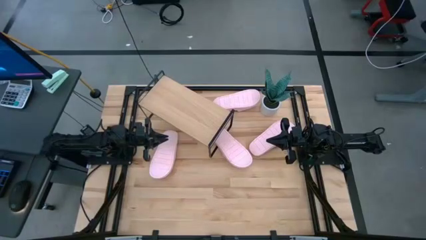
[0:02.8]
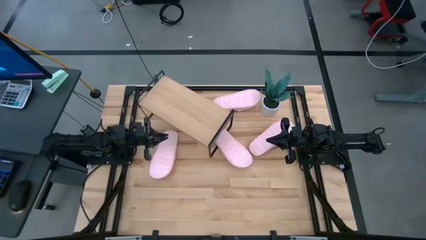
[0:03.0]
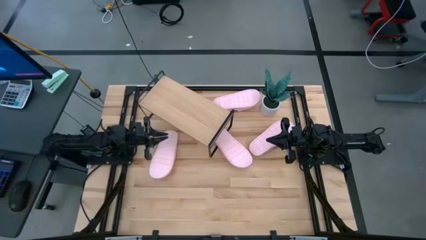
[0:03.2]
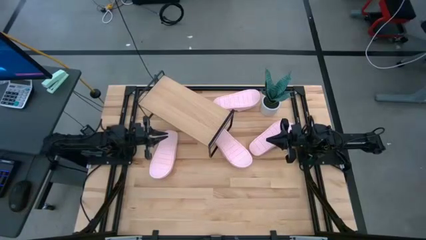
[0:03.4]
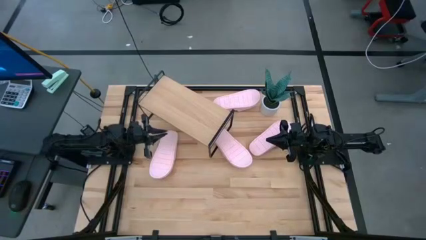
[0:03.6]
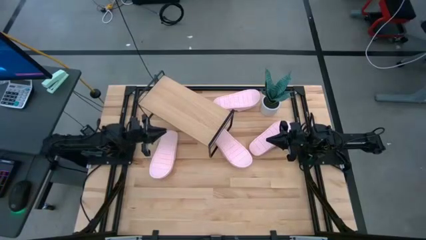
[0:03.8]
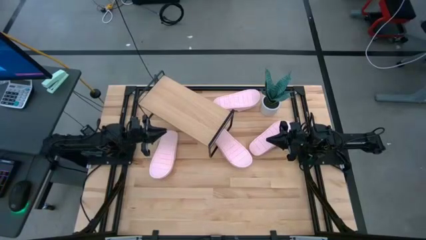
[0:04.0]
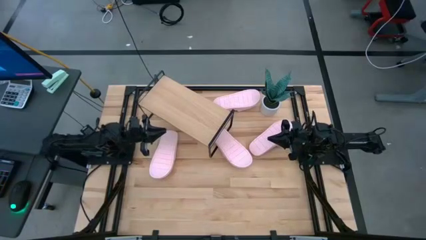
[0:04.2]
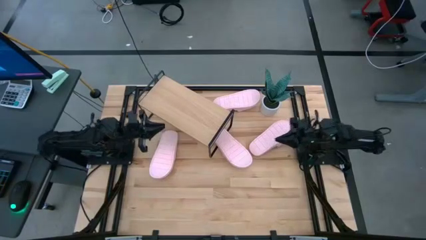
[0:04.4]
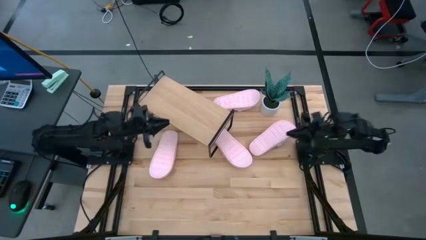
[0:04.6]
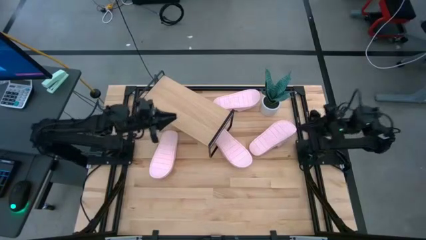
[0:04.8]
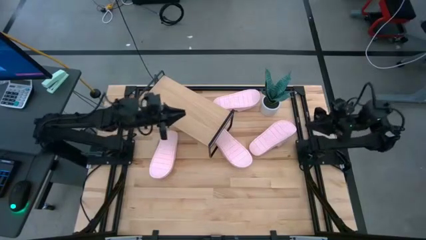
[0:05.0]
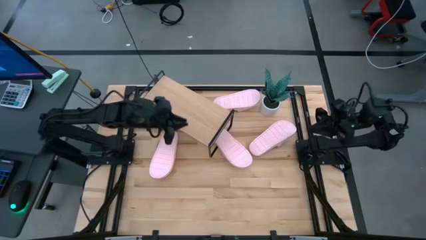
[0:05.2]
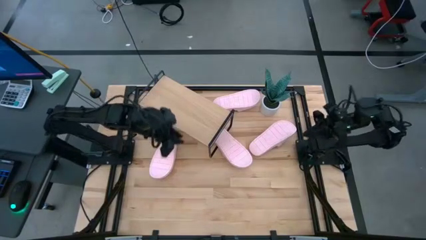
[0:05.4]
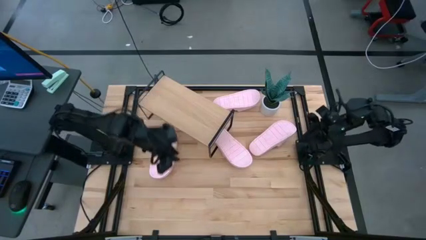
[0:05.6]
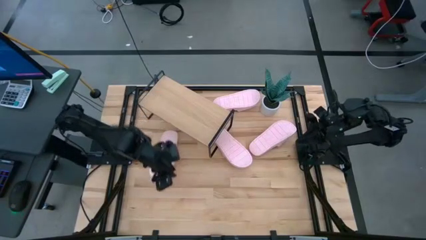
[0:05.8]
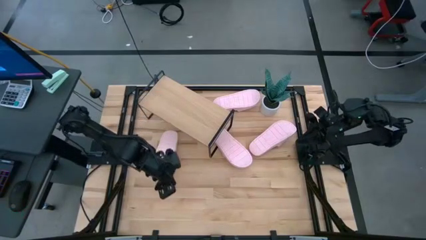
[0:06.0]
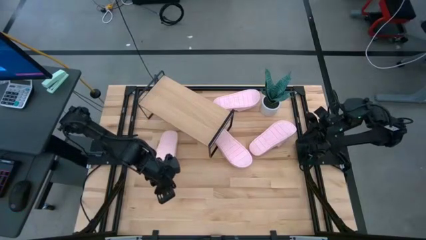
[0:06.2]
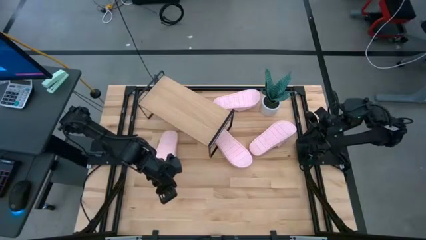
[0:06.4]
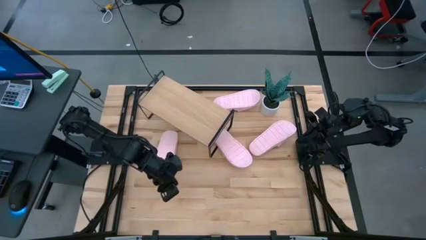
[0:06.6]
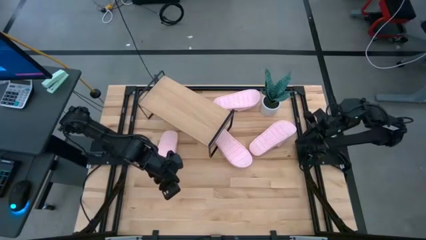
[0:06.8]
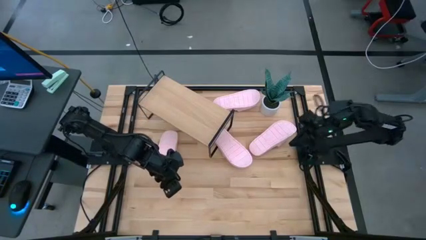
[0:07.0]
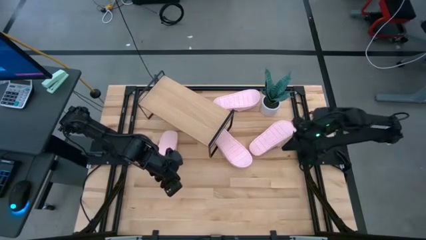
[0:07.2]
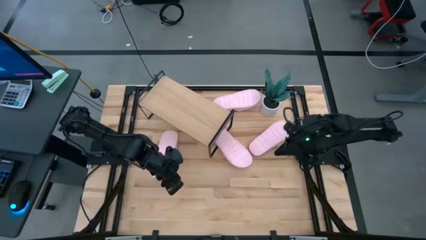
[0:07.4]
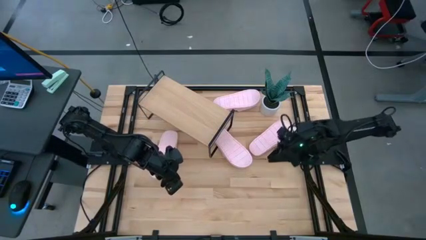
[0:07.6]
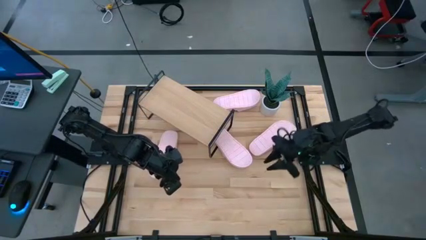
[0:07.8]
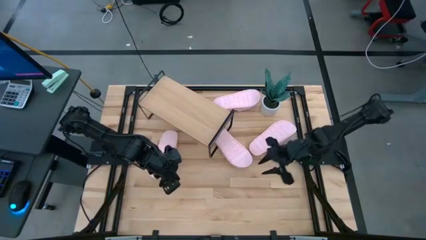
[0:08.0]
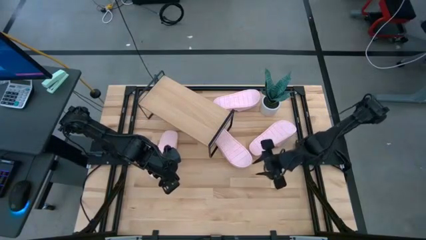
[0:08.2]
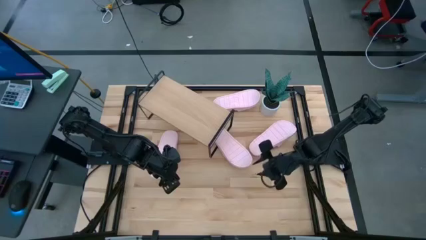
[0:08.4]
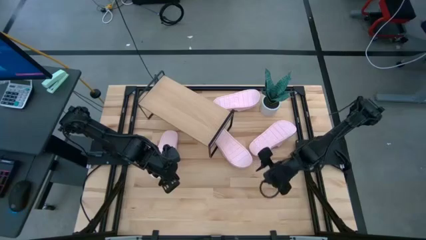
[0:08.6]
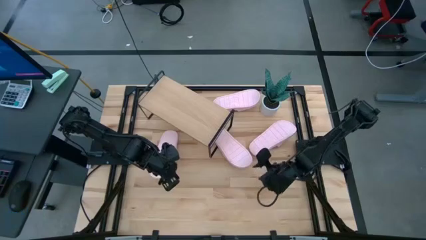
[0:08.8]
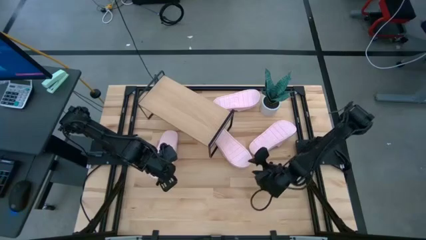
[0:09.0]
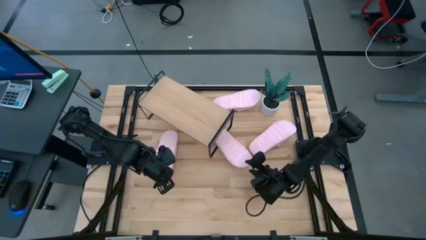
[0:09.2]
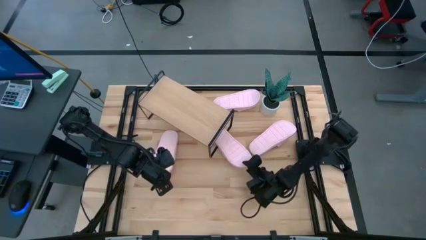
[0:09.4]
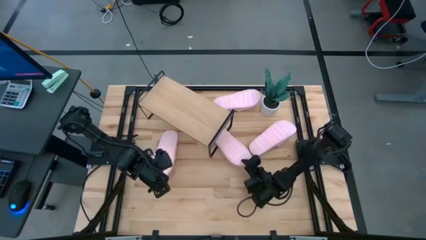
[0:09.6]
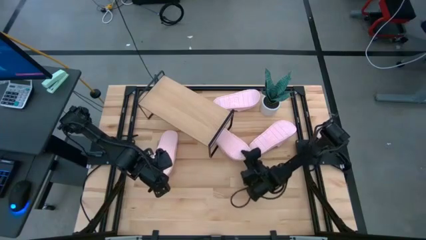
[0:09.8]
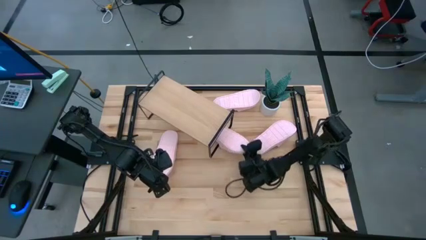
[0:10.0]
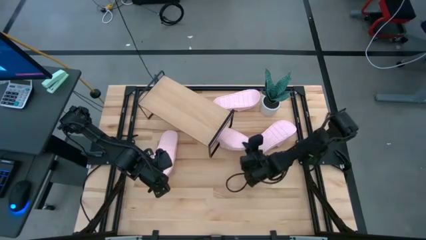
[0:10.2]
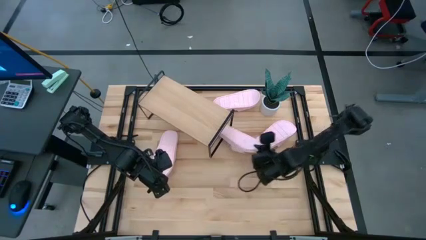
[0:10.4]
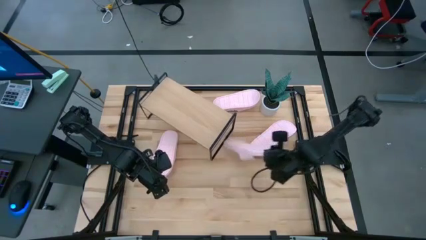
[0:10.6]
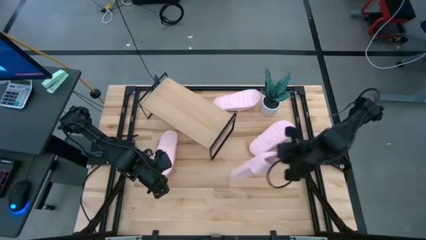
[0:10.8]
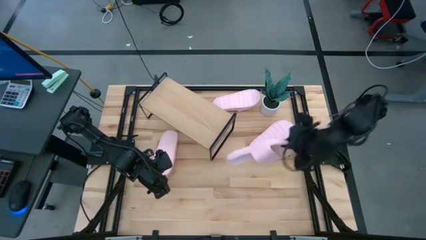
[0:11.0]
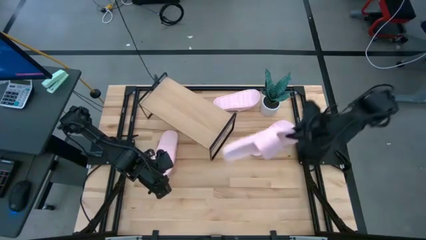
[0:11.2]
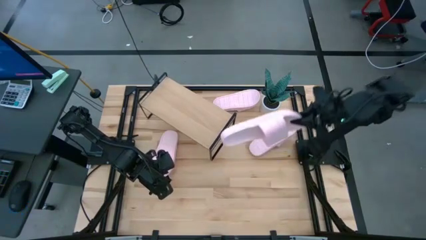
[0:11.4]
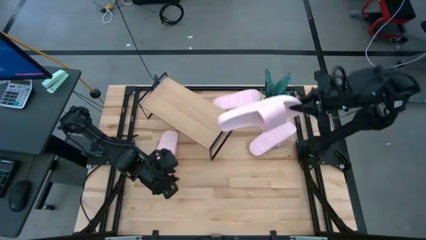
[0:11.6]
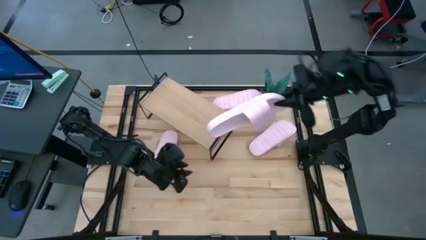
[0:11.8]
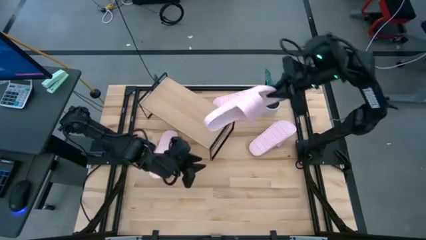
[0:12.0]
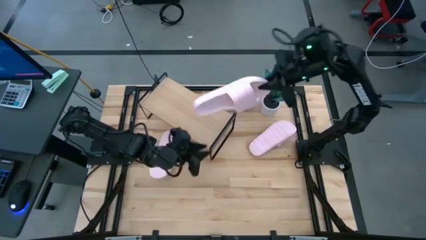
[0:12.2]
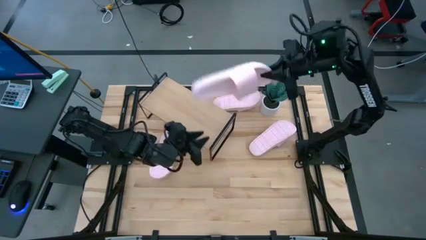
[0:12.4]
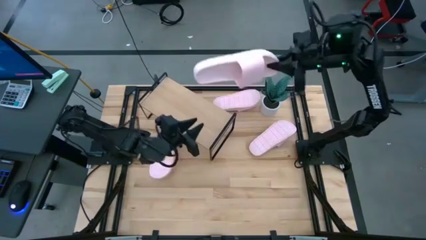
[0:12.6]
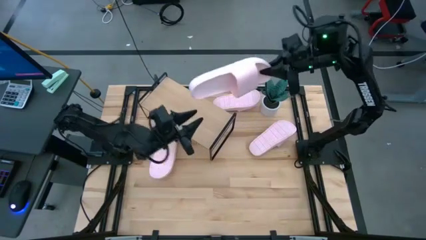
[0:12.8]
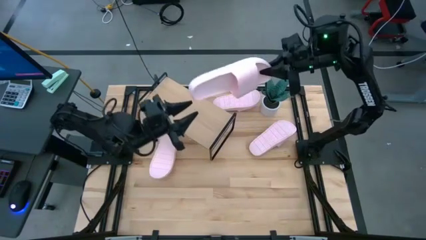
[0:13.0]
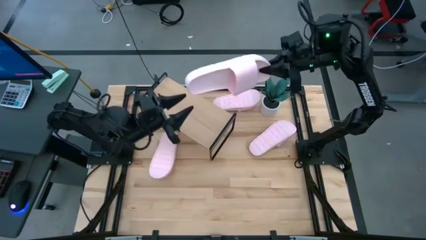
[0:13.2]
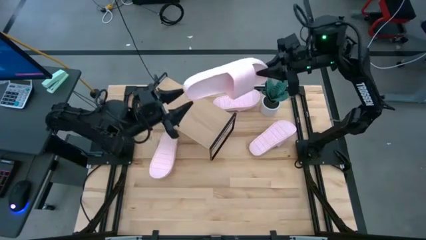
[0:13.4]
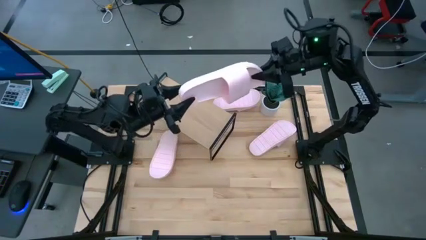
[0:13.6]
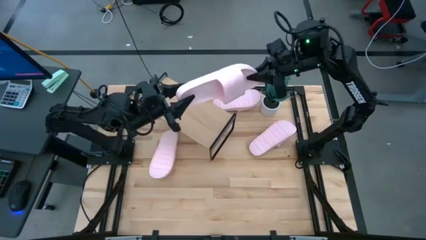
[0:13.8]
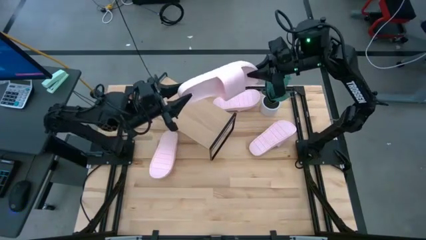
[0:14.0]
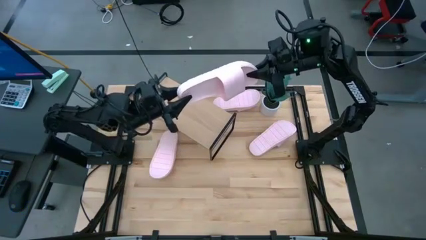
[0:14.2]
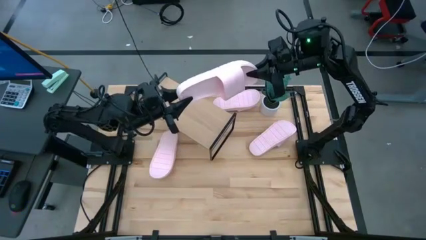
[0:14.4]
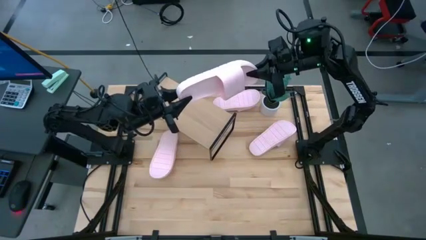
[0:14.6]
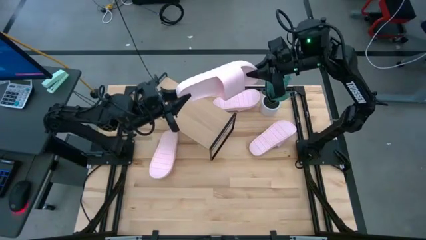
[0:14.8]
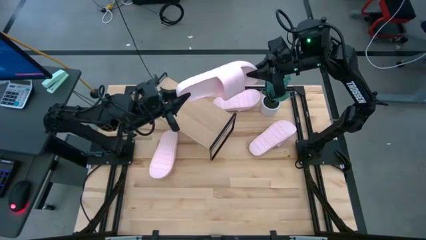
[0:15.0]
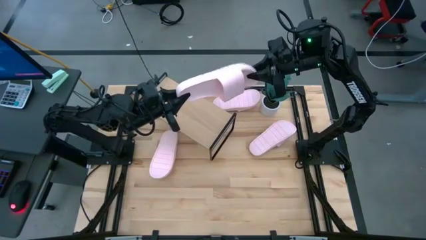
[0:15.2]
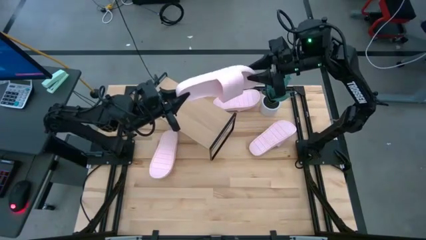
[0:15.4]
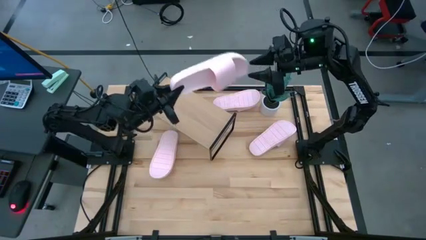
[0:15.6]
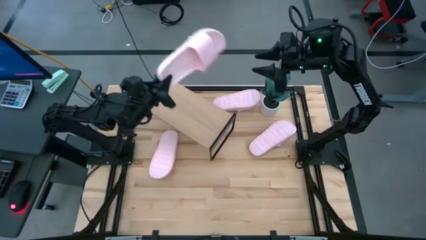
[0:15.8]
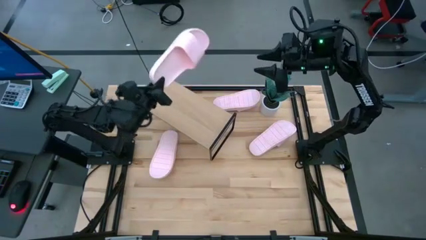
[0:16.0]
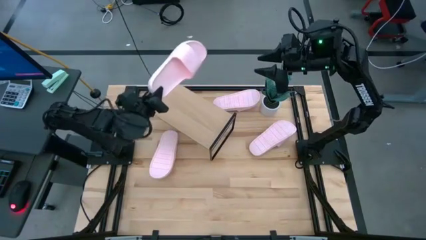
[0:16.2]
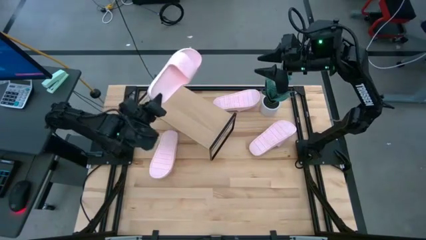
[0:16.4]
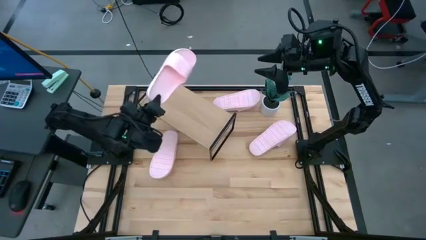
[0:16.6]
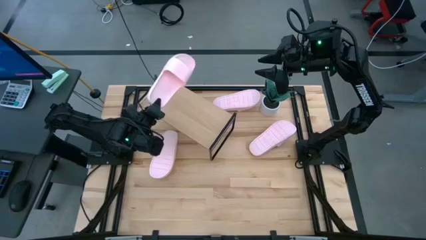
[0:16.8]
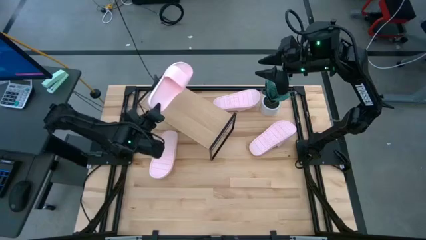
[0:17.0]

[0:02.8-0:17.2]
Task: Pick and place slides into the shelf
Put the pink slipper on the shelf
